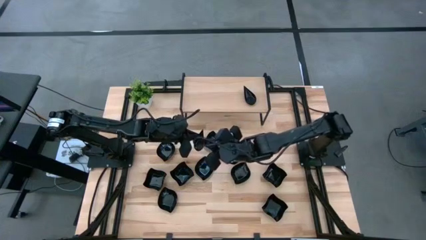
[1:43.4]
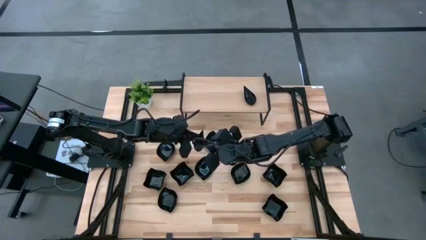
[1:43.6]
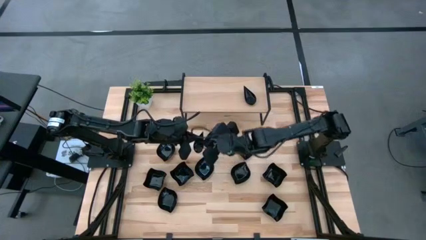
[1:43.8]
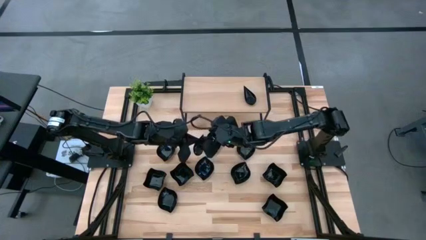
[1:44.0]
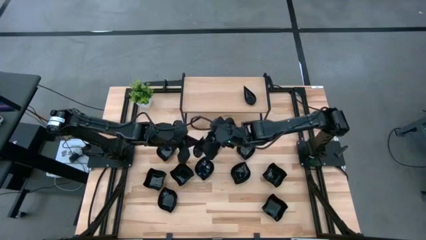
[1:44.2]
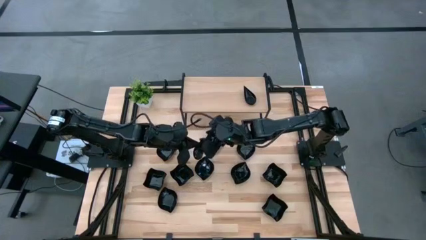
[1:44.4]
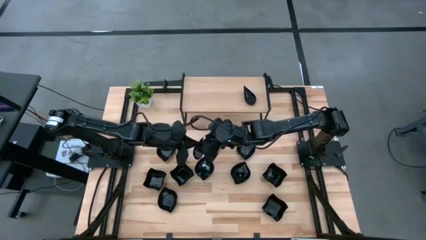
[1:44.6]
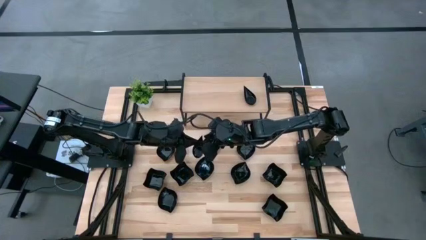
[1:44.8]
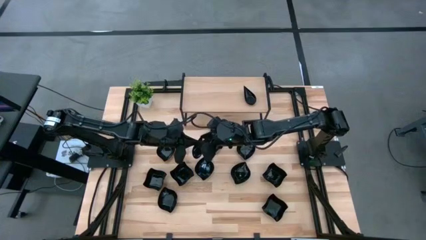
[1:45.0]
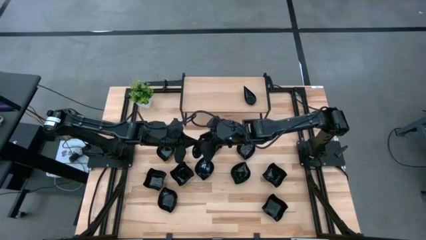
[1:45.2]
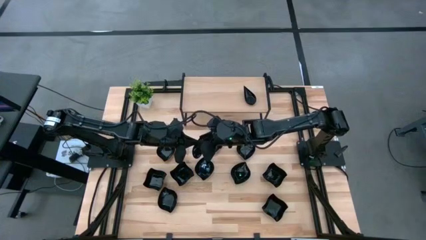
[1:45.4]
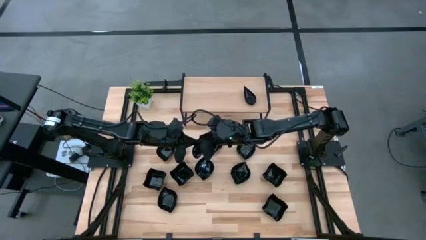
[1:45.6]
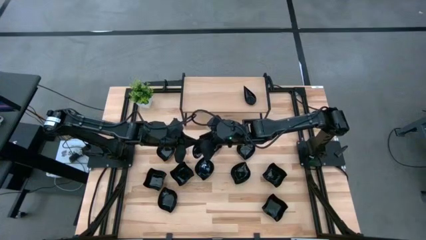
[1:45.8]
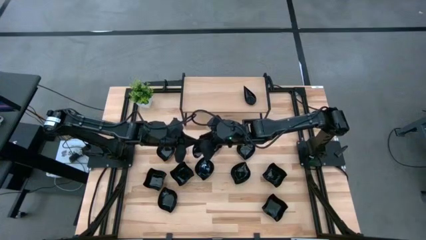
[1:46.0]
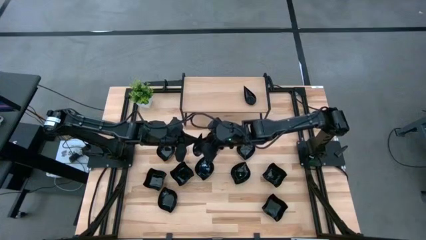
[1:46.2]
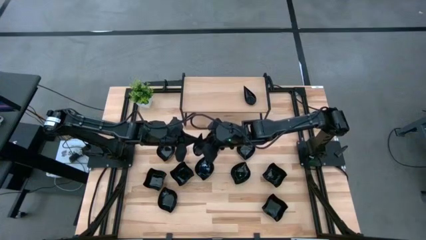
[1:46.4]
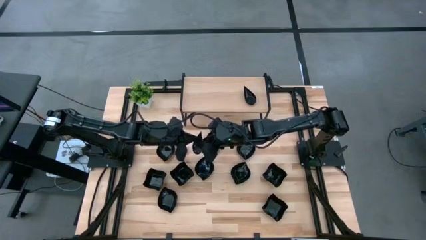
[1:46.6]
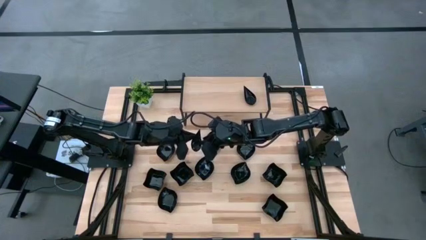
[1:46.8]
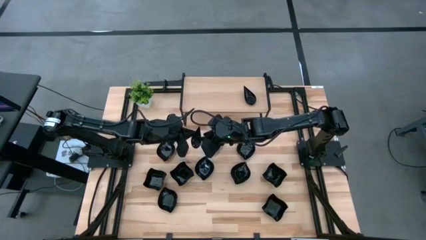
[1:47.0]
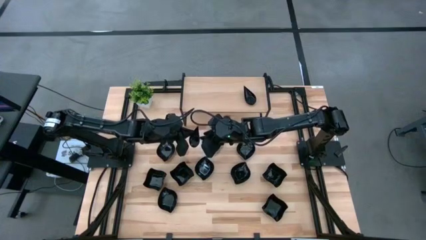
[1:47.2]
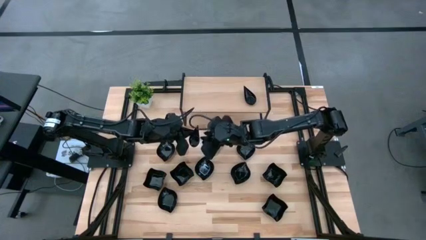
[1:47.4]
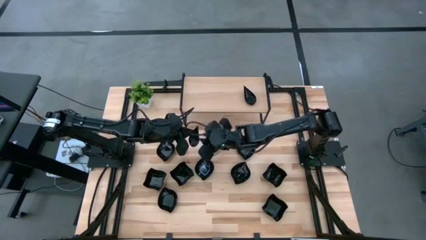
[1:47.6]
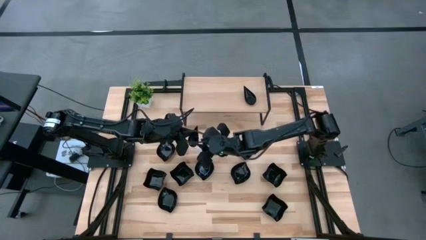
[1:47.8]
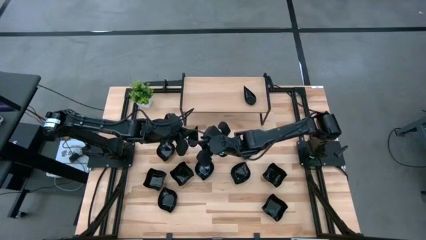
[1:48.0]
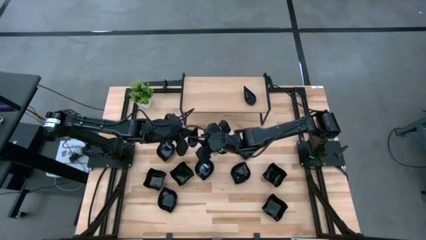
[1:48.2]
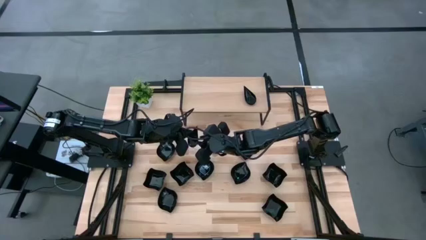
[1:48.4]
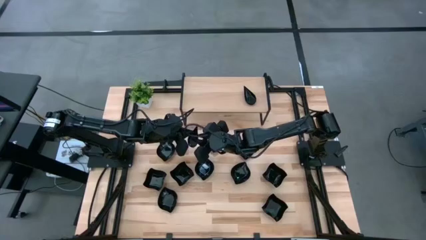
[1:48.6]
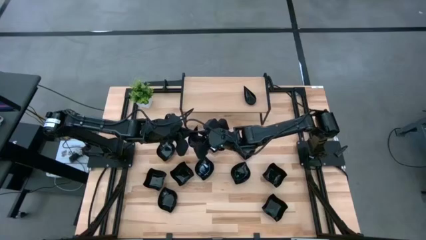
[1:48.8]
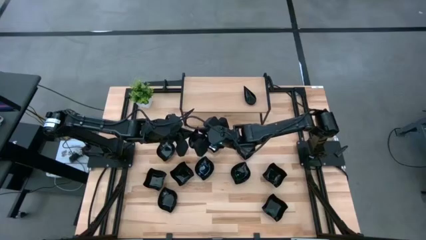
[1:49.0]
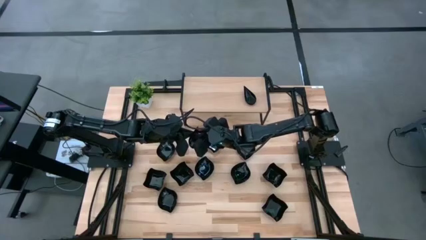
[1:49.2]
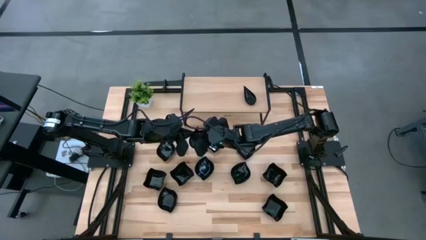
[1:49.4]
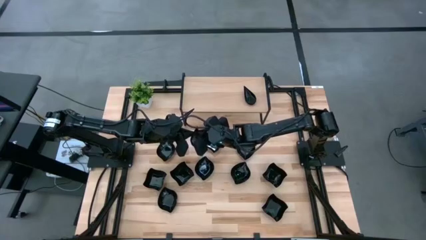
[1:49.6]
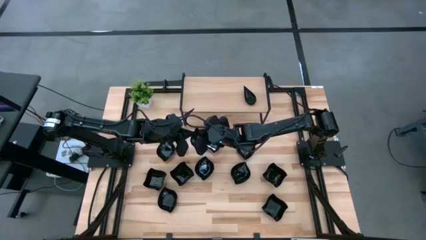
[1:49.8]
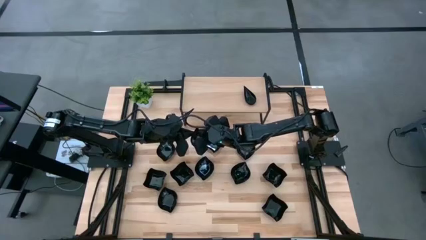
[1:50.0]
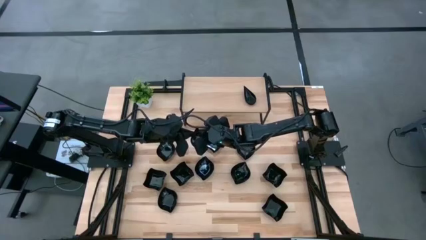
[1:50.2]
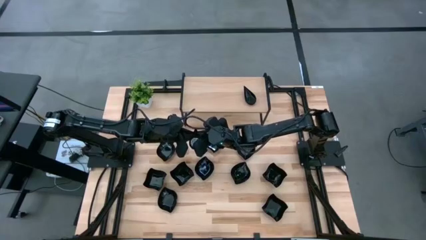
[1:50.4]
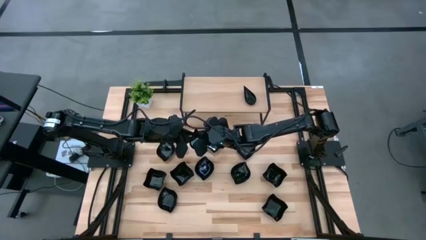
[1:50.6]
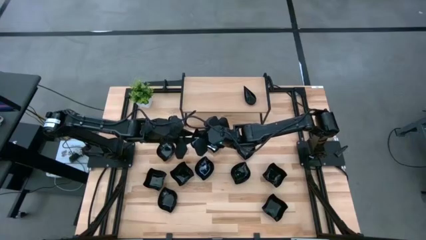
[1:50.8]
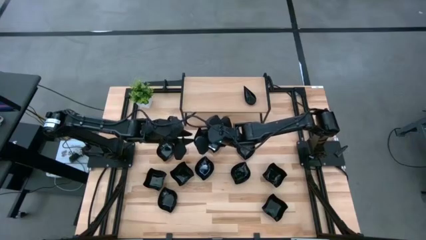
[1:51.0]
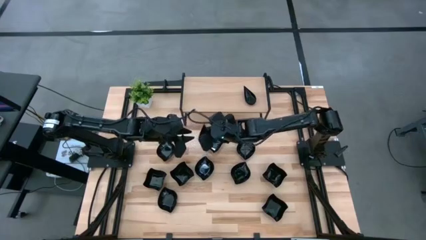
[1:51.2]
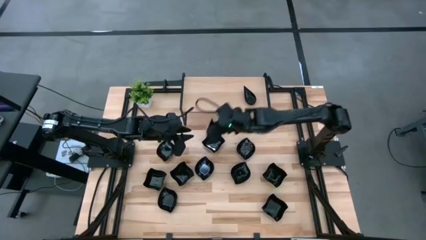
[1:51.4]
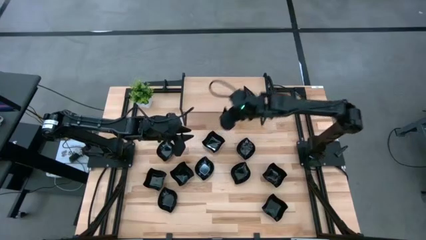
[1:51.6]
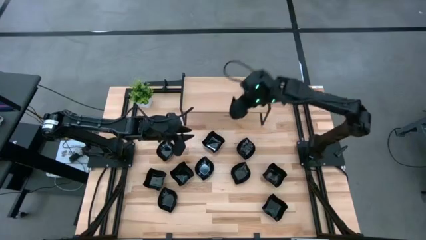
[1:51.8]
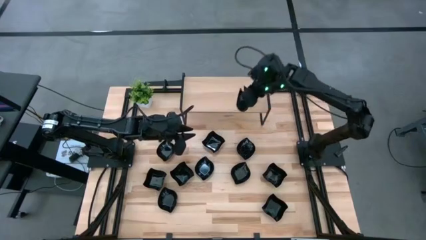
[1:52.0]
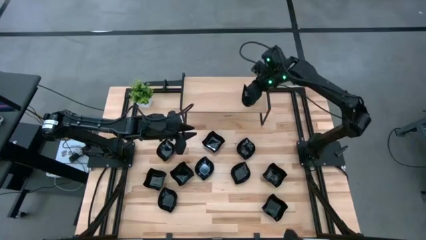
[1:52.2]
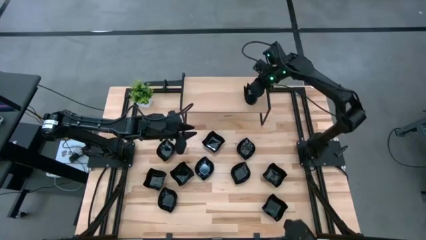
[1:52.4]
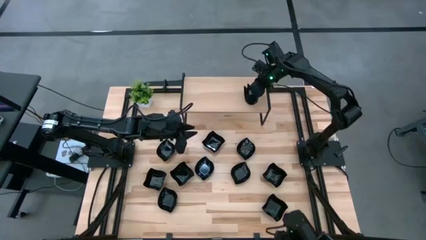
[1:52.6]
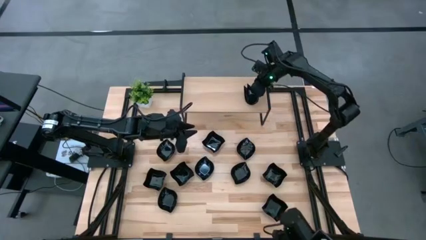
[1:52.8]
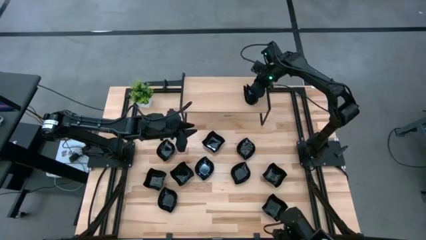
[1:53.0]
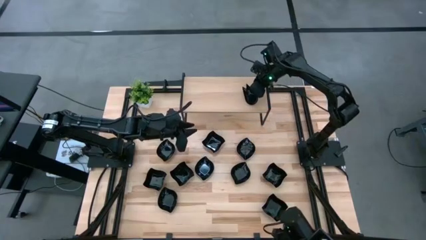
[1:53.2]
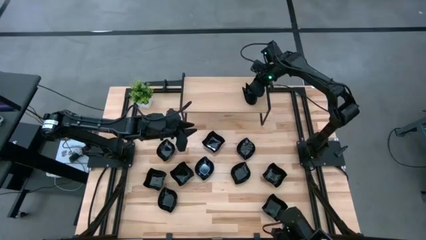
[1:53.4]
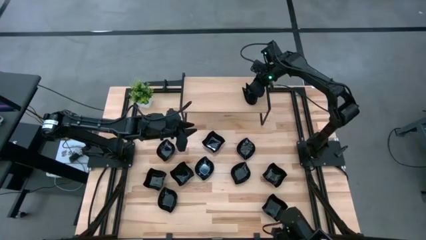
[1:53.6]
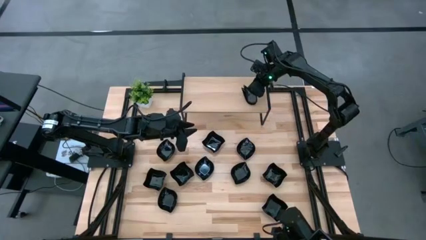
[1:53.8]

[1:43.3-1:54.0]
Task: Pick & Place Mini shaped plates
Stack the black drop shaped plate on top of the black drop shaped plate on the shelf

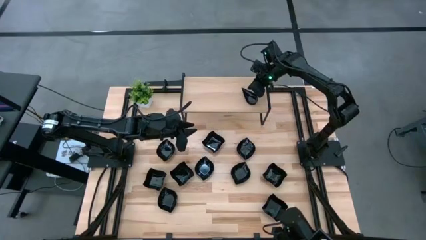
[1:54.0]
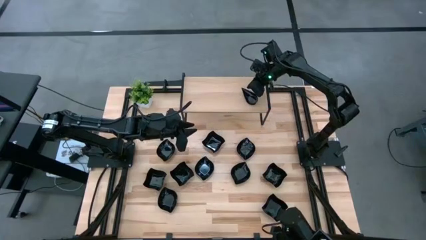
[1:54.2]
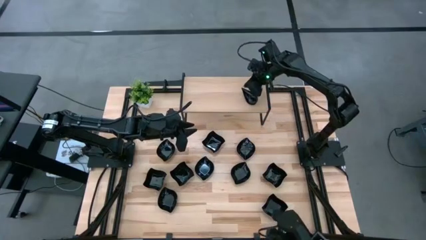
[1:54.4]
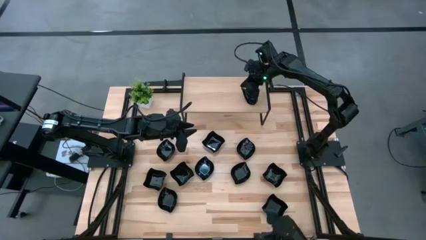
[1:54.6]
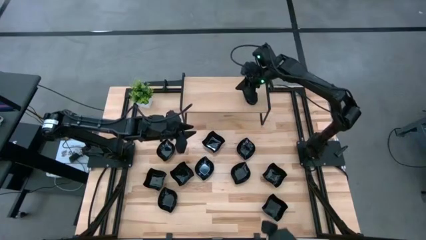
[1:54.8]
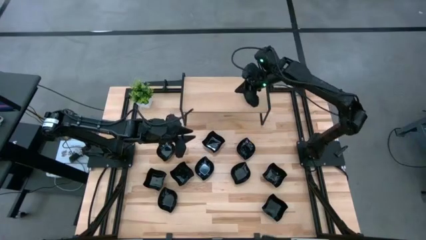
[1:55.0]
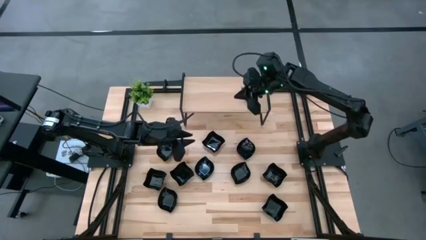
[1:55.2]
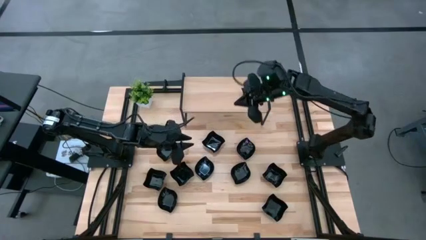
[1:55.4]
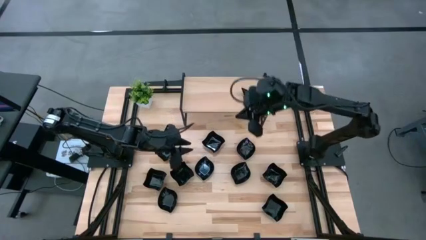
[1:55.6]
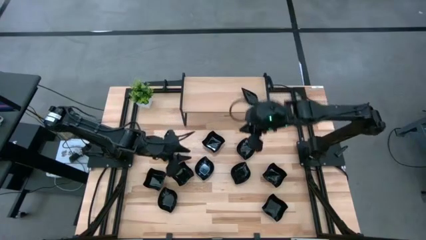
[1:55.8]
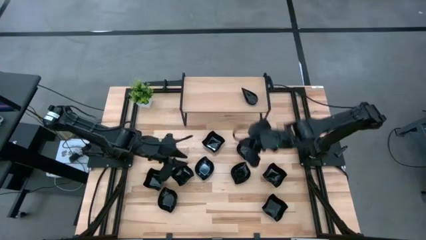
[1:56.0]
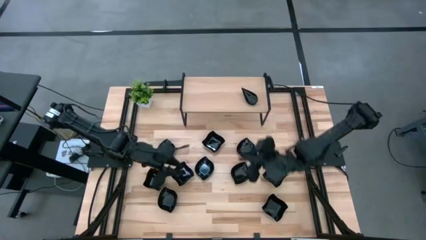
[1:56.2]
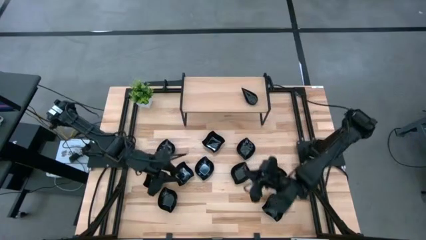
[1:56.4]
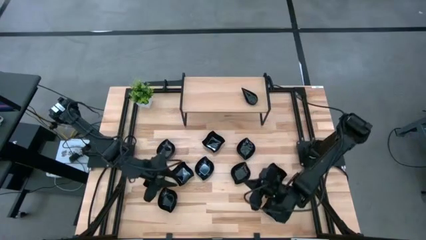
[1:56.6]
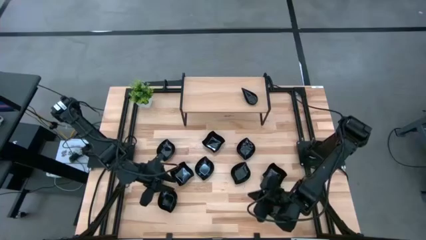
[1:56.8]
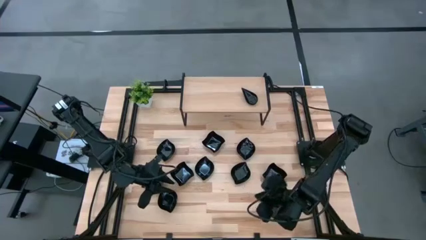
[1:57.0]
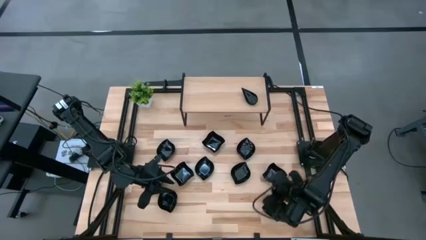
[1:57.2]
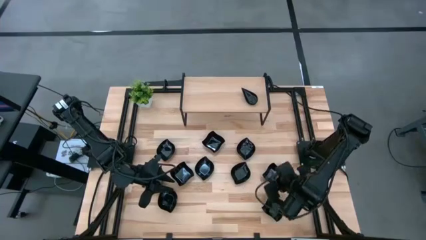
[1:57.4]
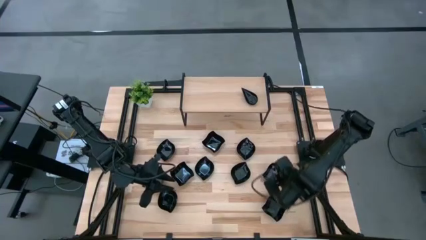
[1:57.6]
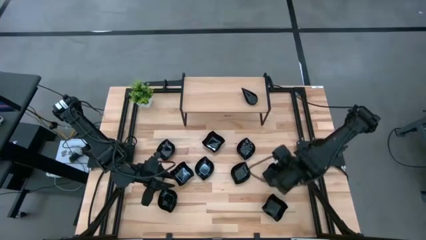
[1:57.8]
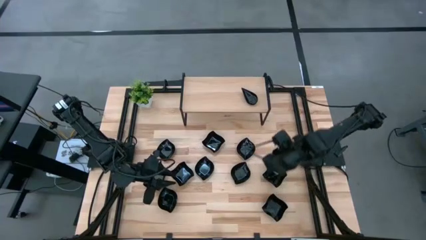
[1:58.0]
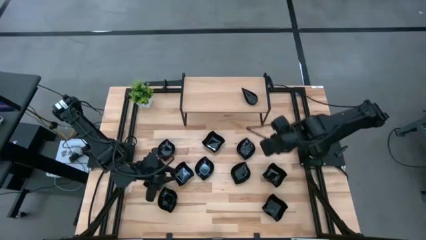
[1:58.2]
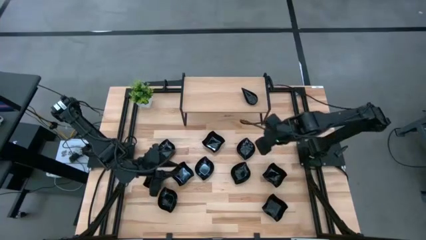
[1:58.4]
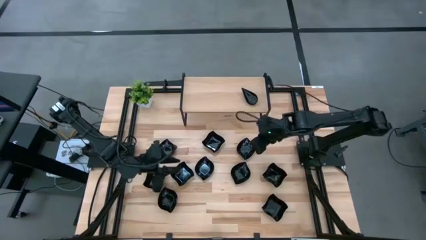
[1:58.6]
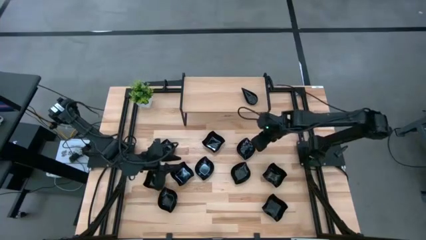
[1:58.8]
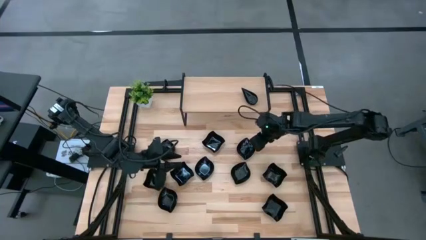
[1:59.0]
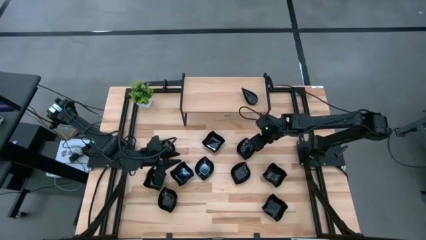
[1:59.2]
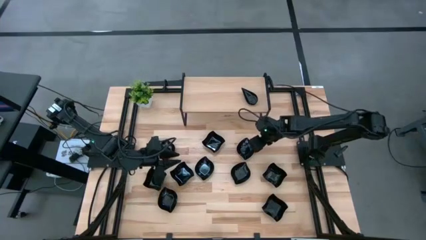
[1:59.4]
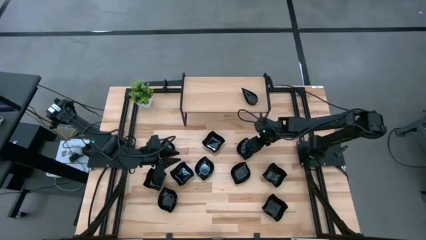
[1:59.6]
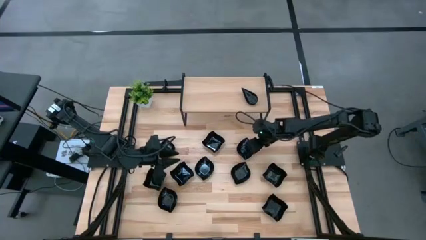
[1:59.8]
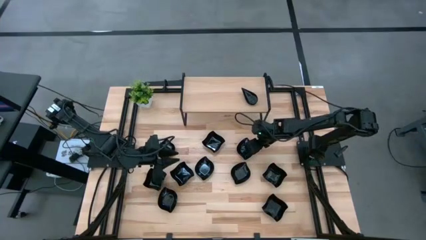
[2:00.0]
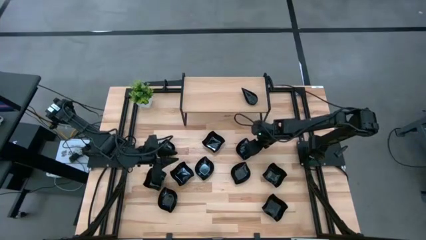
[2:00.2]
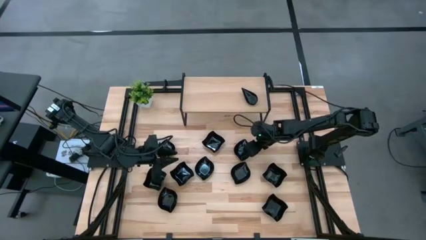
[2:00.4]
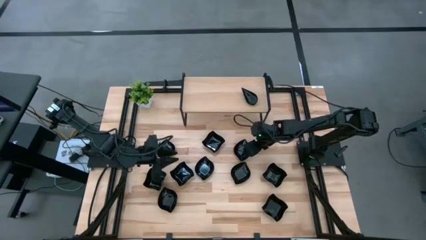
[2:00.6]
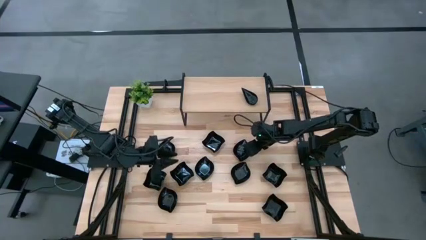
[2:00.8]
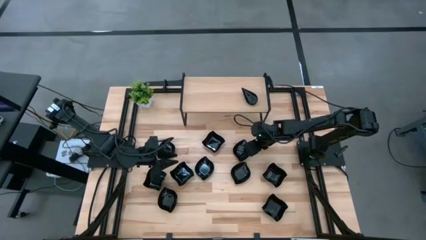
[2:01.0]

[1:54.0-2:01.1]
Put the black leaf shaped plate on the shelf
